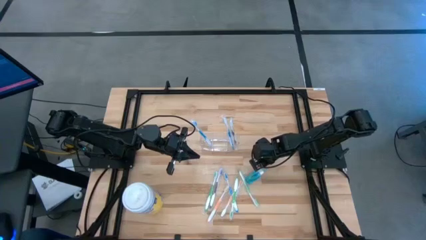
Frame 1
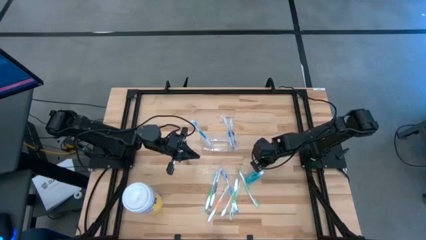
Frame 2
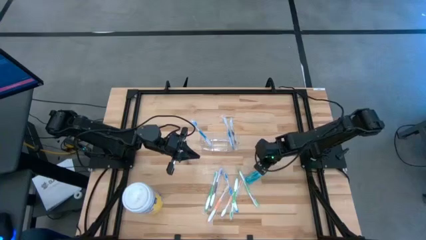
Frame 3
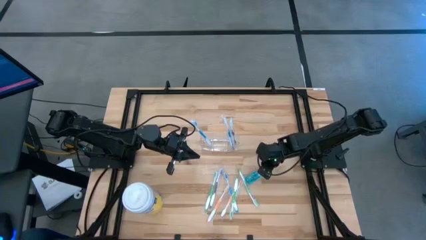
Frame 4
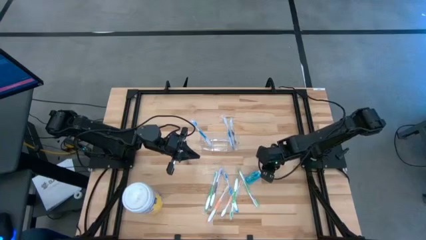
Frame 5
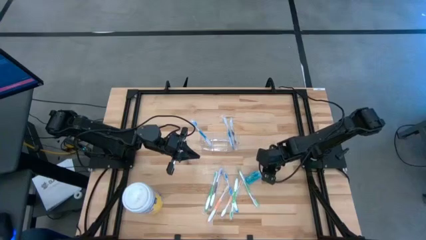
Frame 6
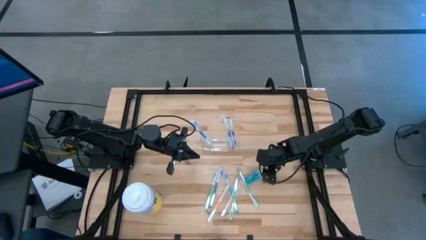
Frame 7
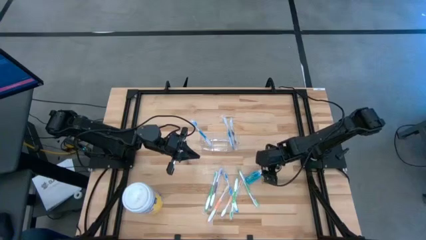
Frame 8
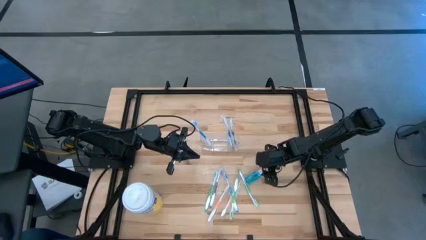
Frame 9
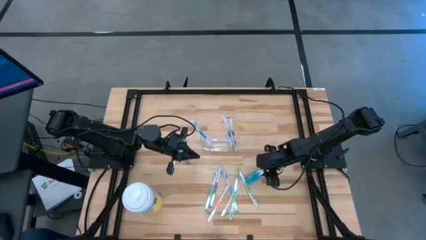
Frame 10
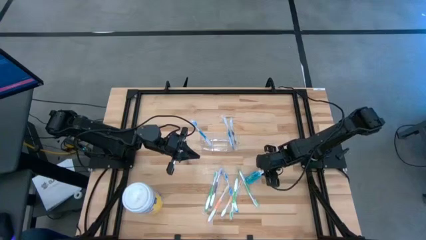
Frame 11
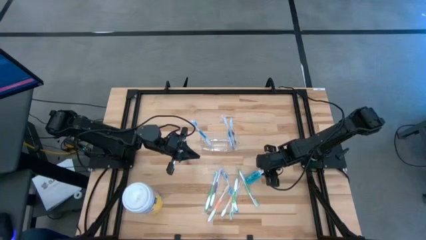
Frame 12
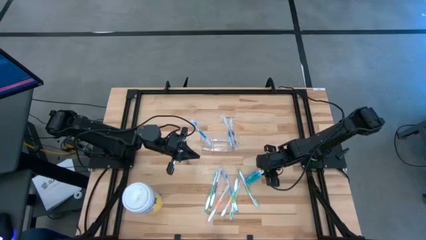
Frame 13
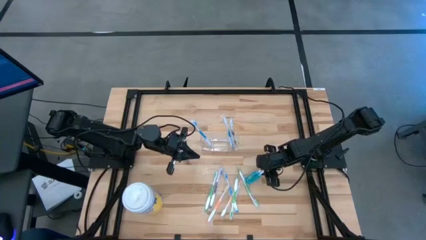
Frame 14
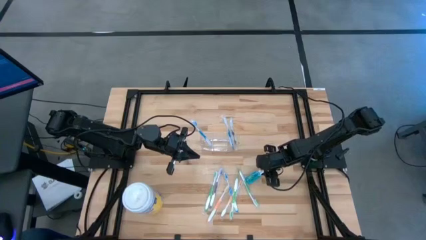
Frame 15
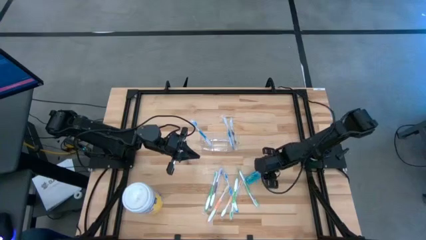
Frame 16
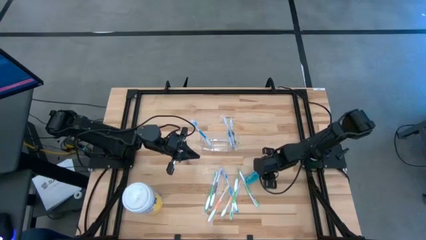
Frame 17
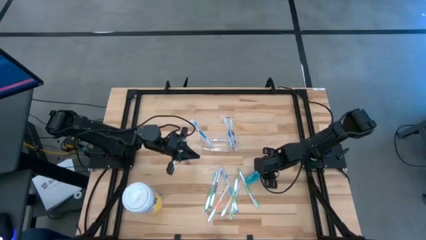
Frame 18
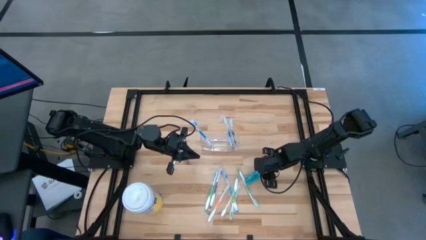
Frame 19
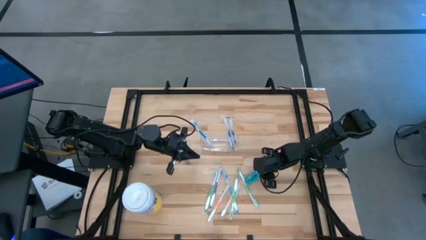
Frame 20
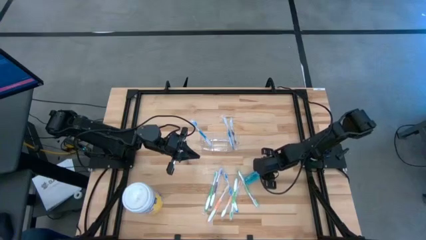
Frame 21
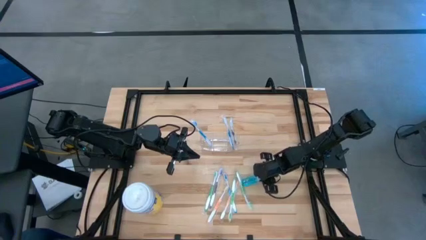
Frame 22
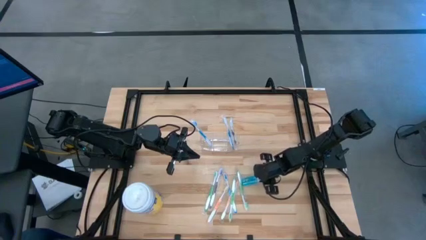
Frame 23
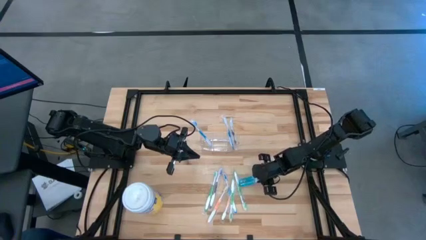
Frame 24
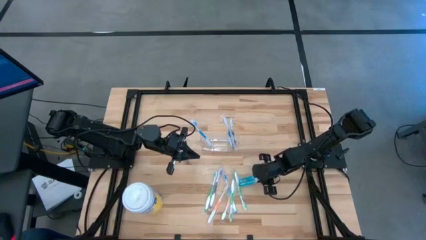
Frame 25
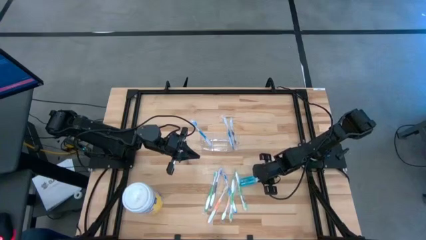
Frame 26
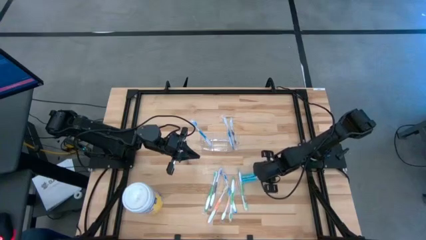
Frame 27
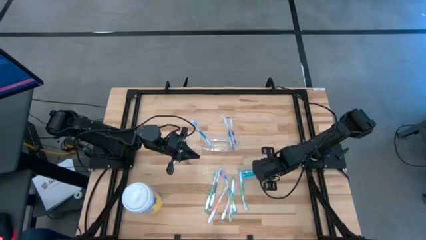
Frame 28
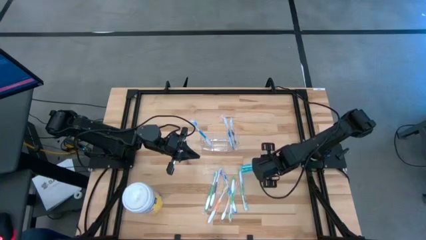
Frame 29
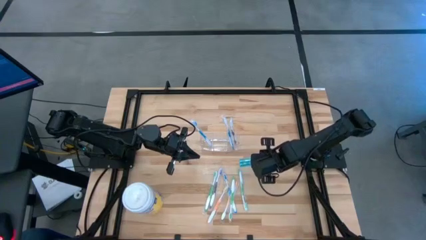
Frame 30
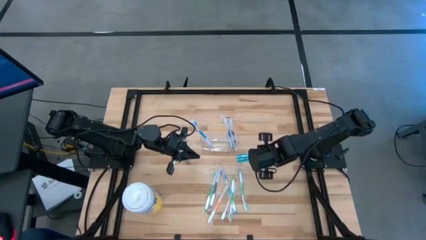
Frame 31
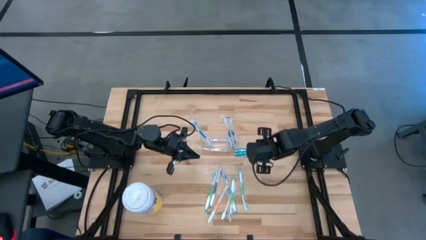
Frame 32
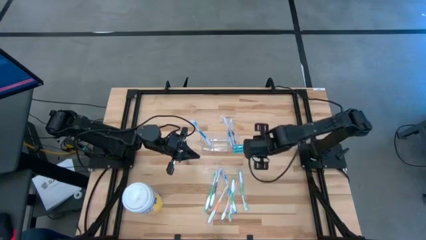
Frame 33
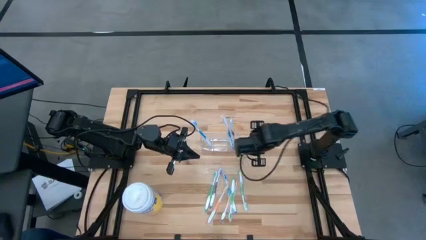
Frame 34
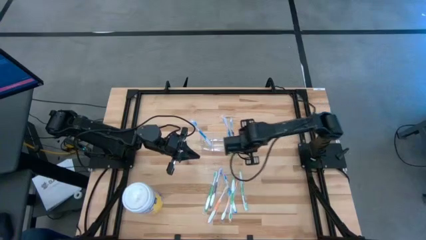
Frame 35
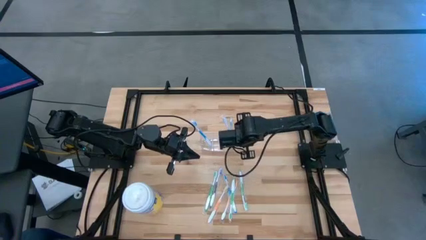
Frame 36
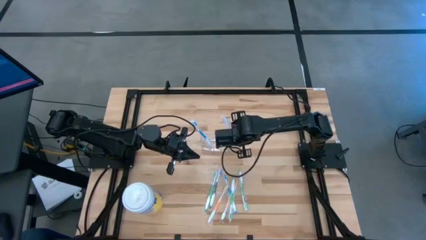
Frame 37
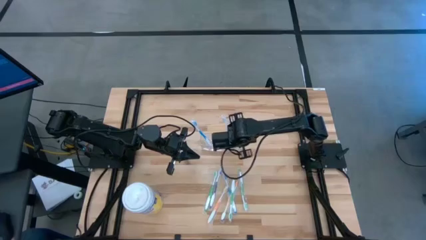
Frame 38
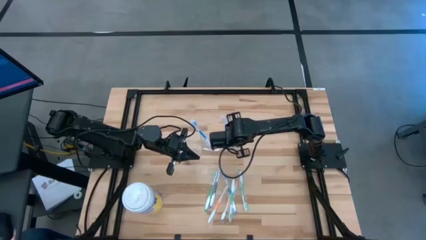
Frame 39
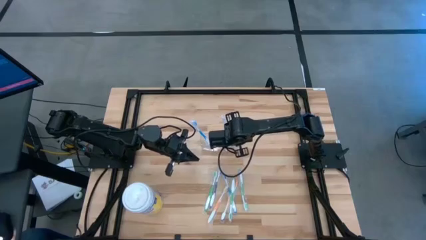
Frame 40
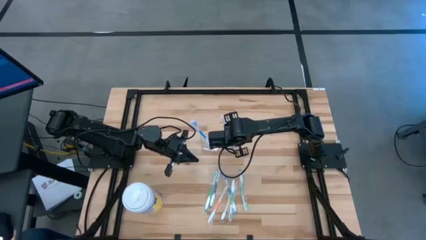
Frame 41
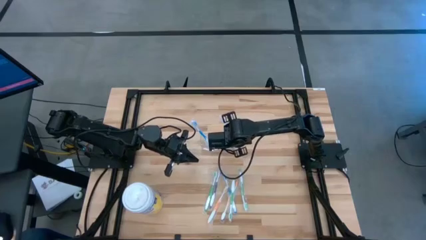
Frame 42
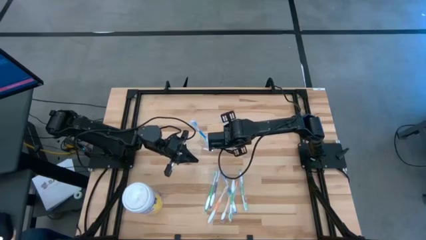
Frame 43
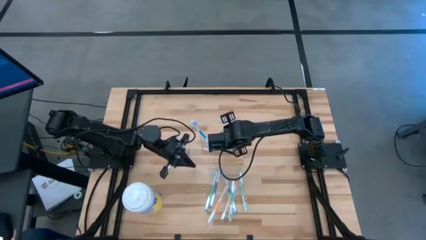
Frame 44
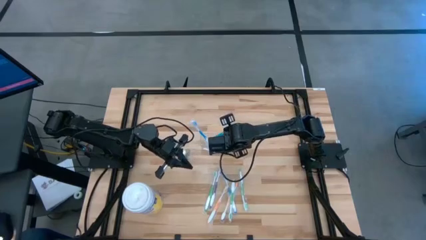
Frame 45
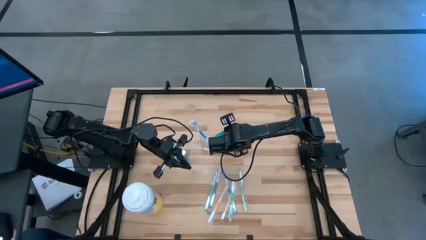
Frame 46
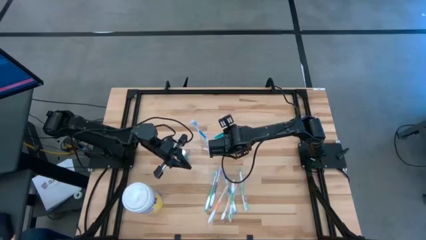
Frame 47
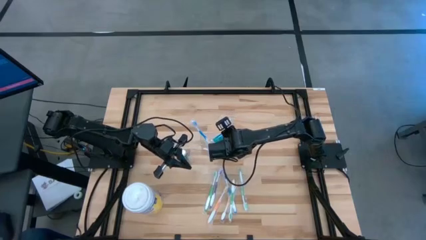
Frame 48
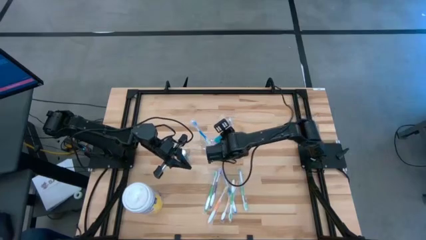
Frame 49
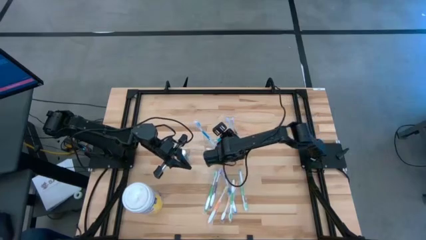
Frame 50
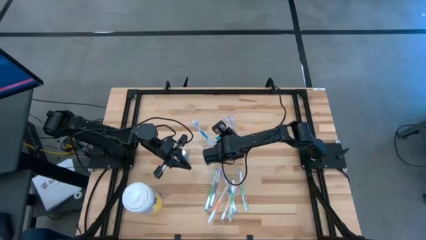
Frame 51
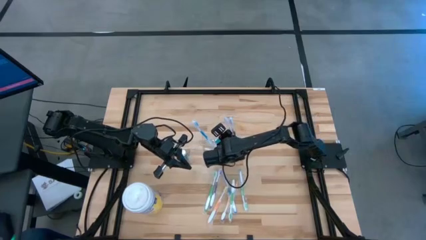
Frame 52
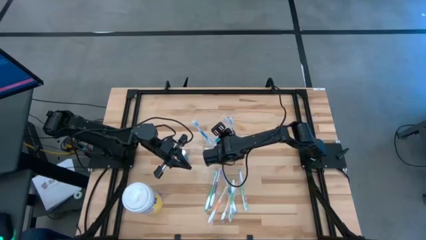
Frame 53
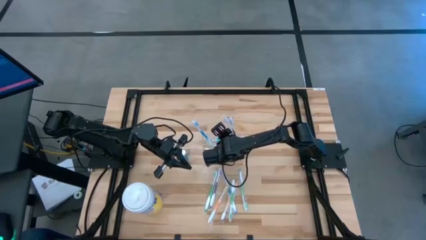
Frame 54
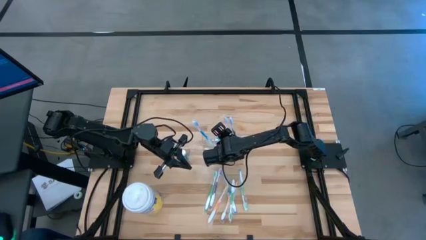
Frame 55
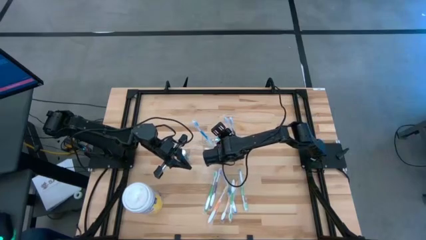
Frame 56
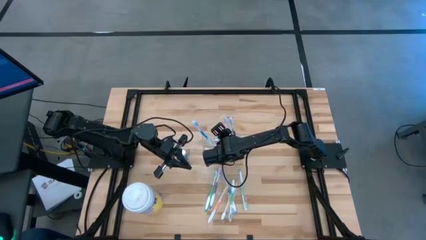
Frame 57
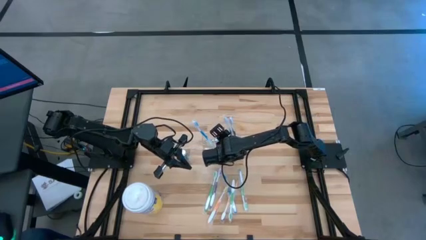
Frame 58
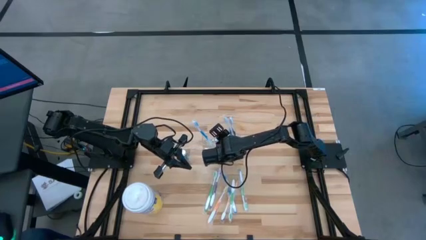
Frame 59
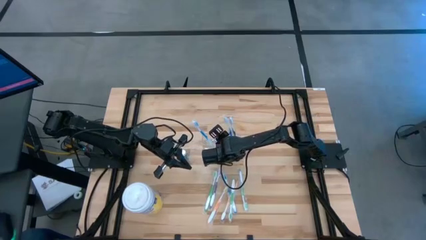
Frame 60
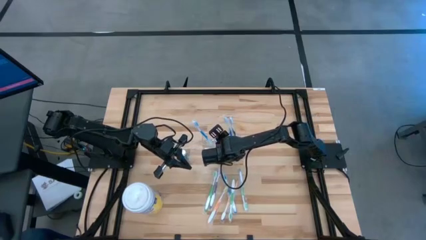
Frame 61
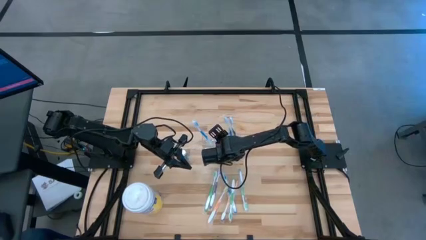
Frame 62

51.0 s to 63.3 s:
Task: Pick & Place toothbrushing station
Put the mouthwash into the transparent organizer

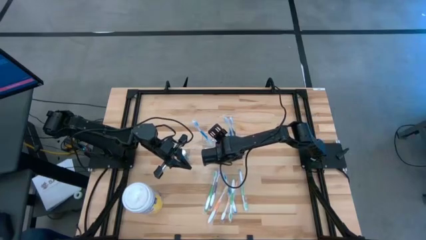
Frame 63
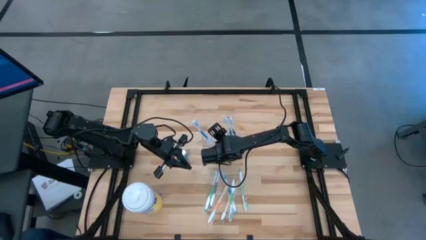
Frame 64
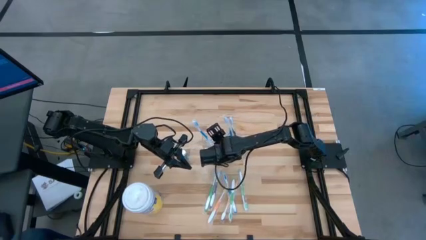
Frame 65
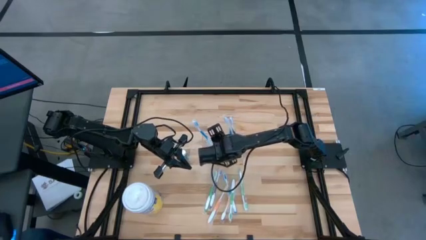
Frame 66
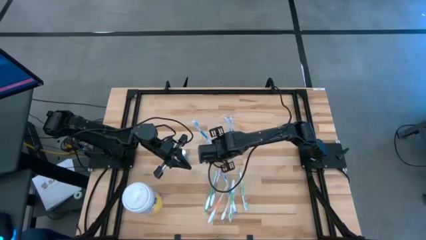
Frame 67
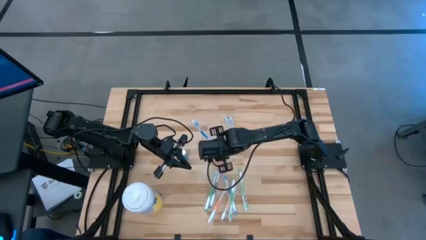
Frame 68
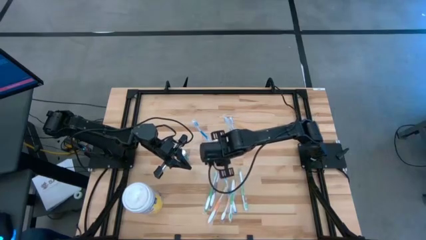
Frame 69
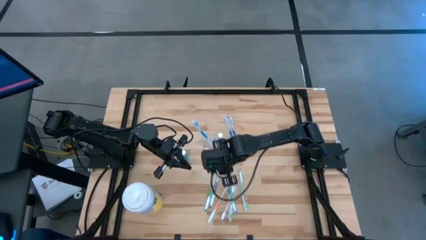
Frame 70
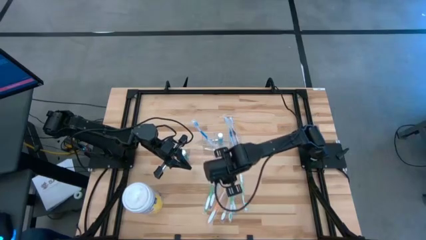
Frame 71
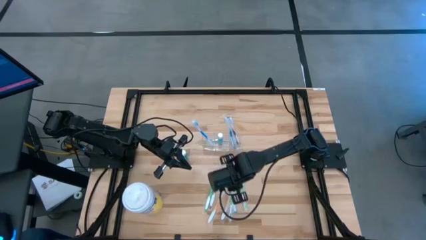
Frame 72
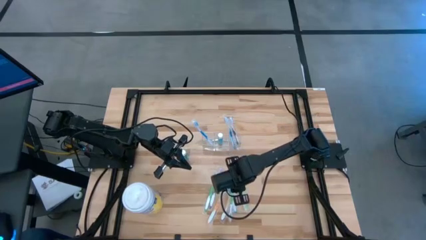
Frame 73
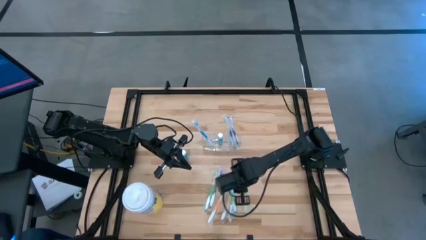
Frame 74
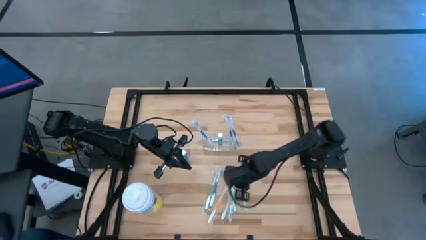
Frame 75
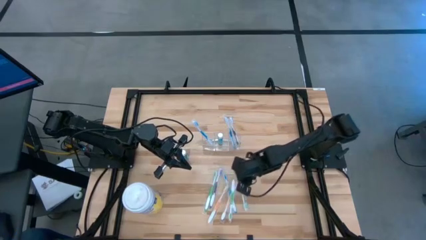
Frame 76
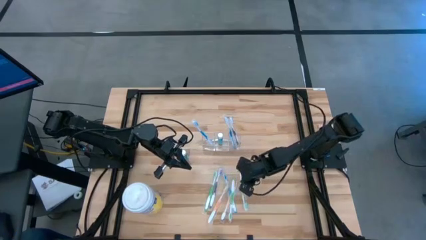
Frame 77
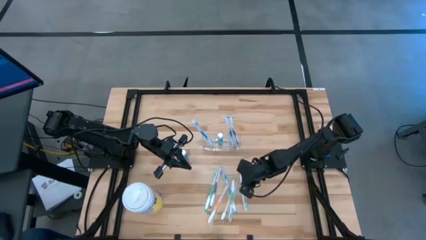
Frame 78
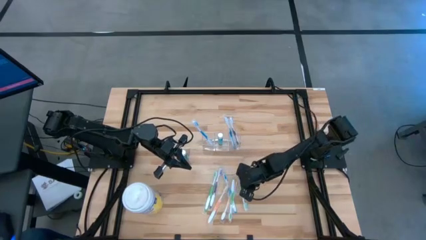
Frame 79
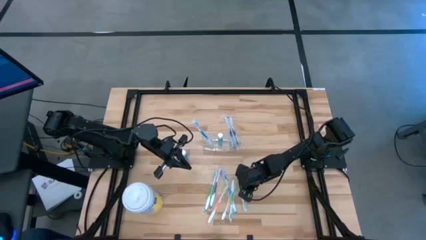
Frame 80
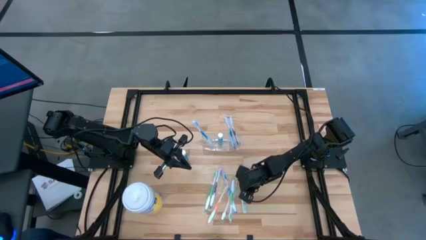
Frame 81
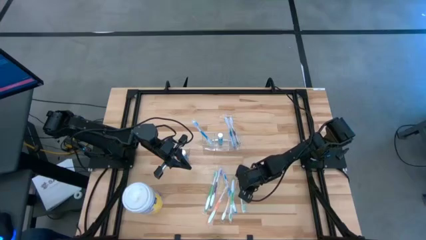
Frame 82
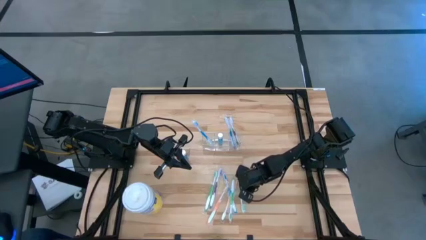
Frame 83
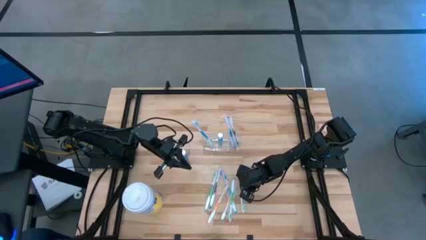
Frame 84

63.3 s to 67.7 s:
Put the green toothbrush into the transparent organizer
